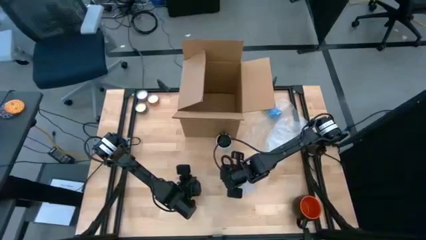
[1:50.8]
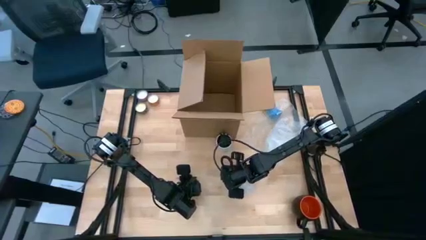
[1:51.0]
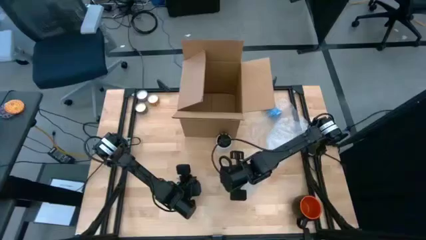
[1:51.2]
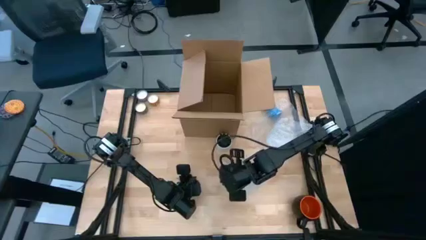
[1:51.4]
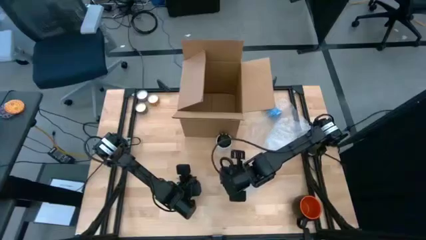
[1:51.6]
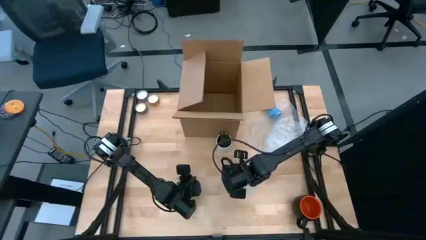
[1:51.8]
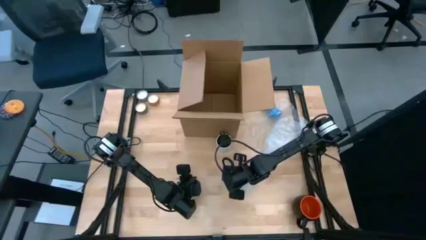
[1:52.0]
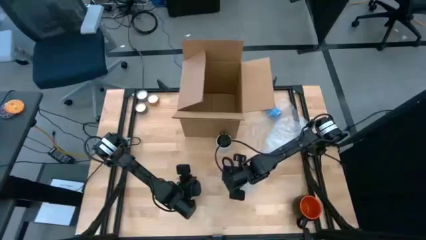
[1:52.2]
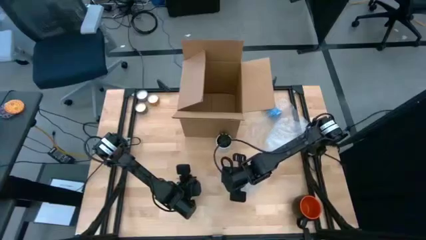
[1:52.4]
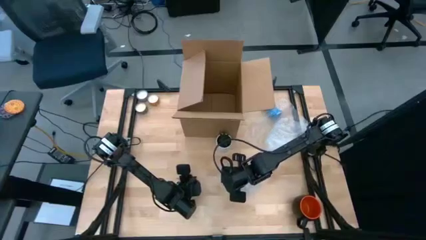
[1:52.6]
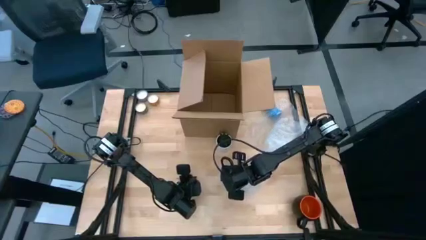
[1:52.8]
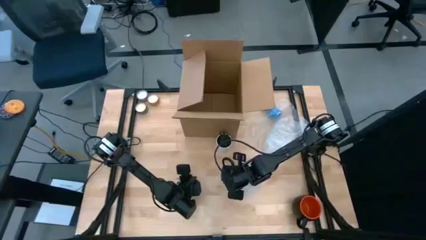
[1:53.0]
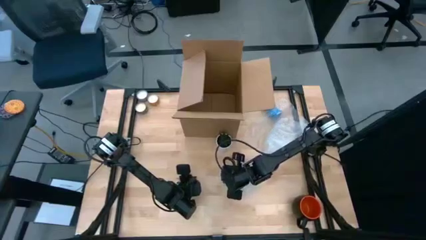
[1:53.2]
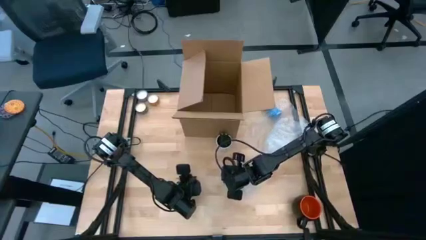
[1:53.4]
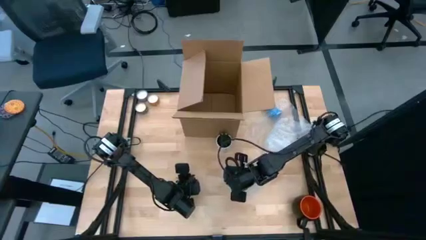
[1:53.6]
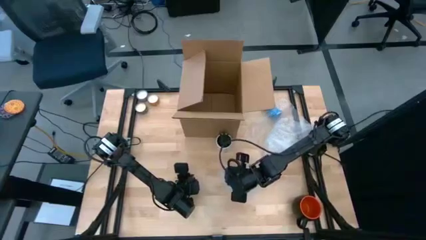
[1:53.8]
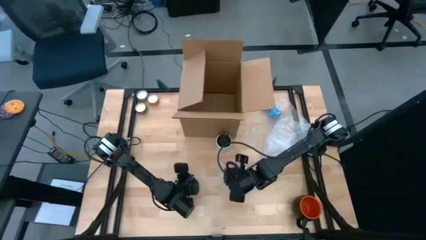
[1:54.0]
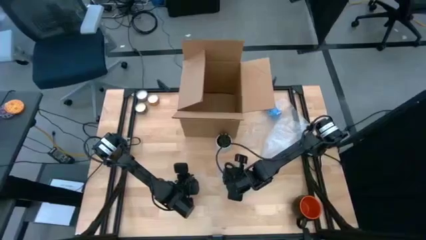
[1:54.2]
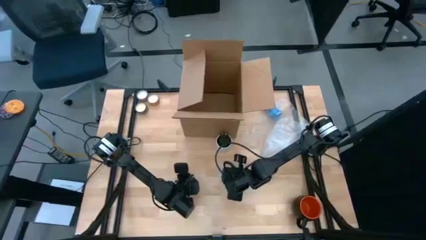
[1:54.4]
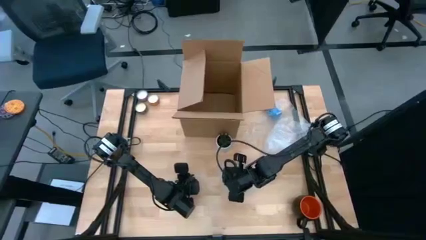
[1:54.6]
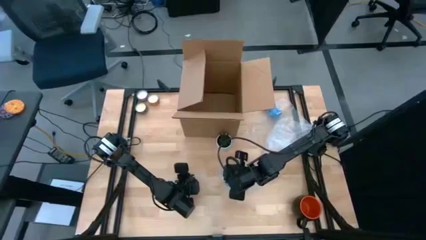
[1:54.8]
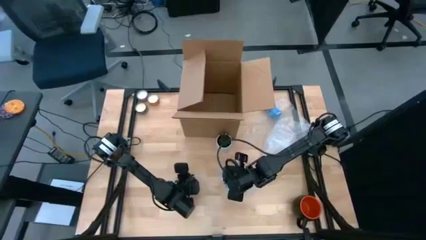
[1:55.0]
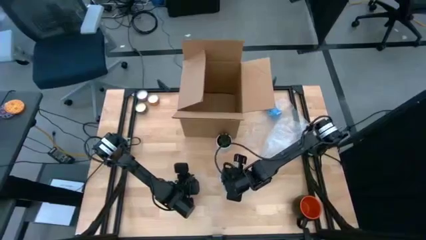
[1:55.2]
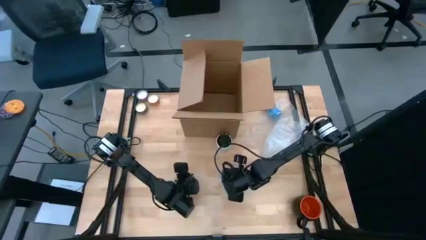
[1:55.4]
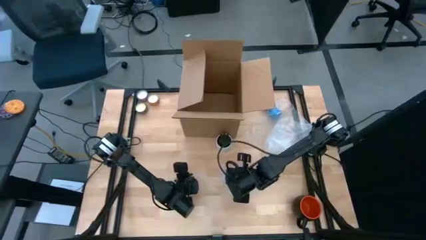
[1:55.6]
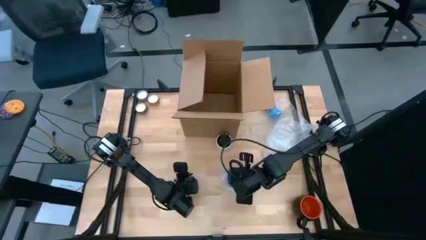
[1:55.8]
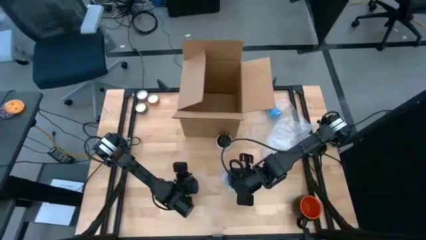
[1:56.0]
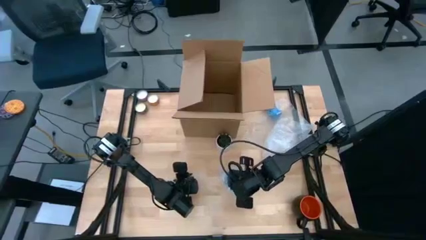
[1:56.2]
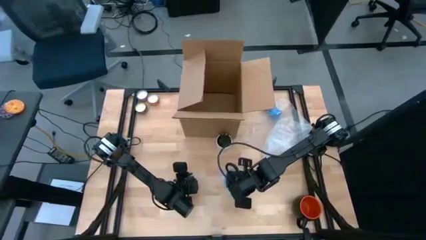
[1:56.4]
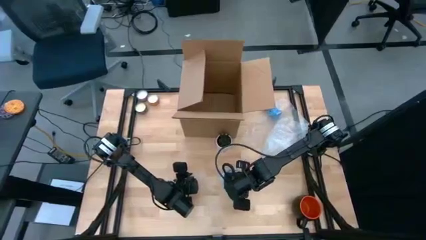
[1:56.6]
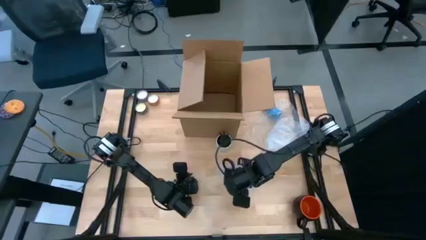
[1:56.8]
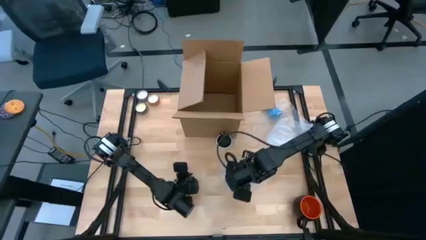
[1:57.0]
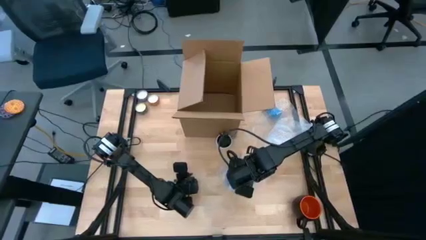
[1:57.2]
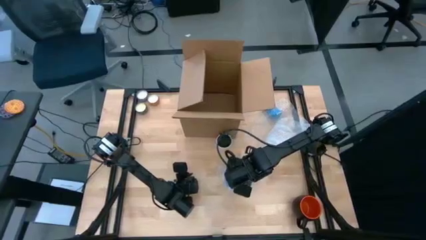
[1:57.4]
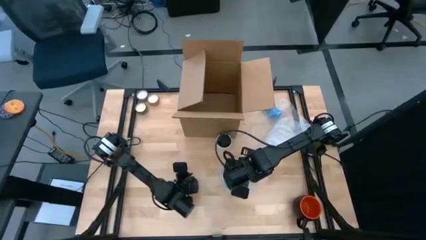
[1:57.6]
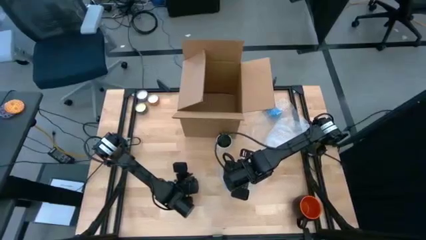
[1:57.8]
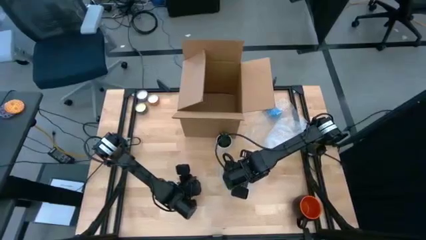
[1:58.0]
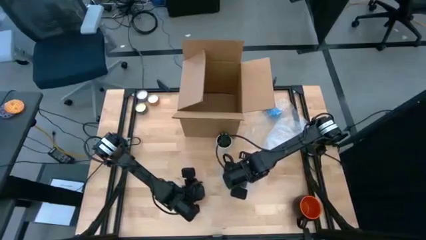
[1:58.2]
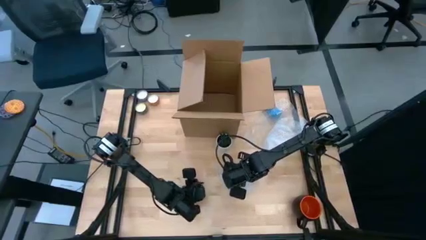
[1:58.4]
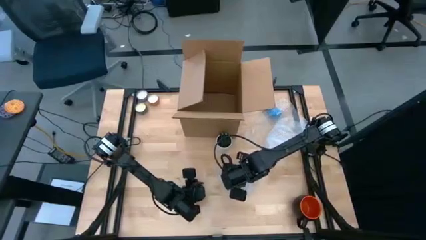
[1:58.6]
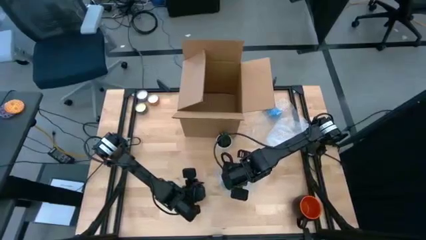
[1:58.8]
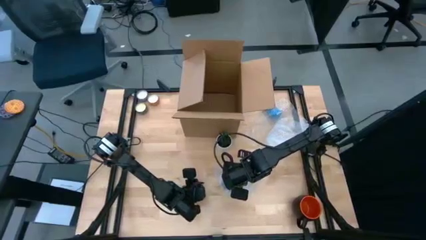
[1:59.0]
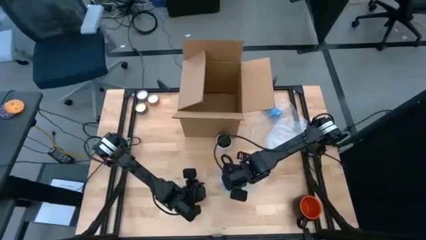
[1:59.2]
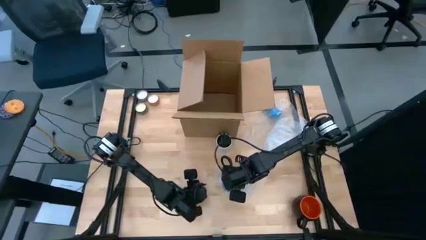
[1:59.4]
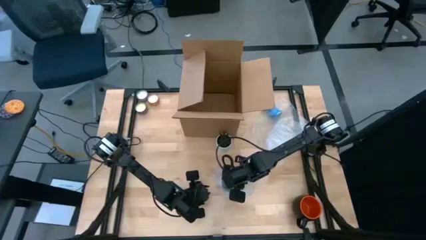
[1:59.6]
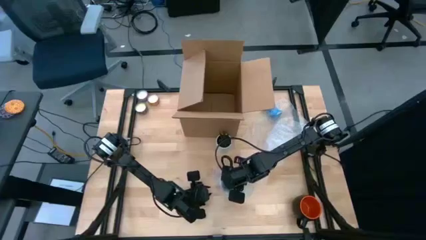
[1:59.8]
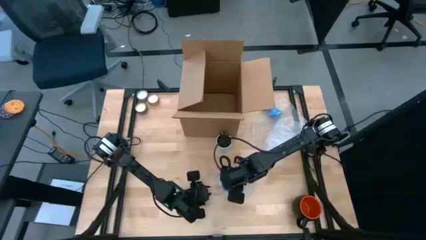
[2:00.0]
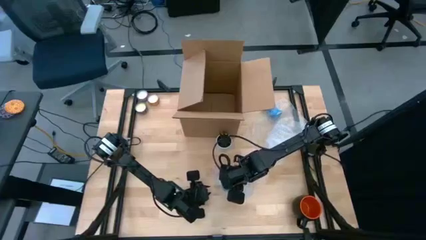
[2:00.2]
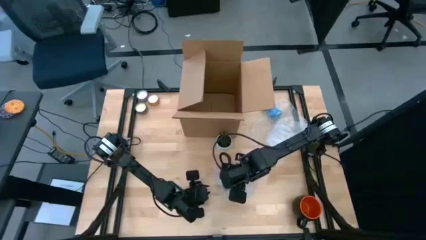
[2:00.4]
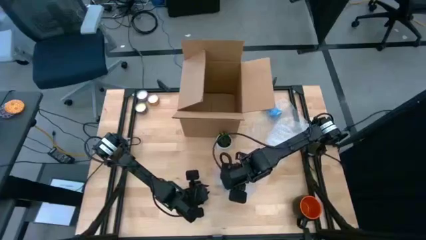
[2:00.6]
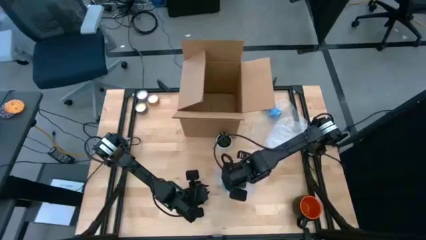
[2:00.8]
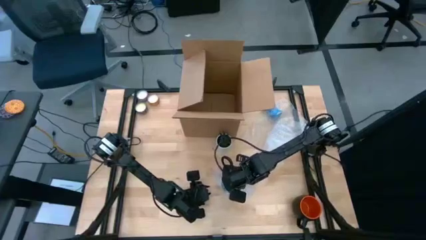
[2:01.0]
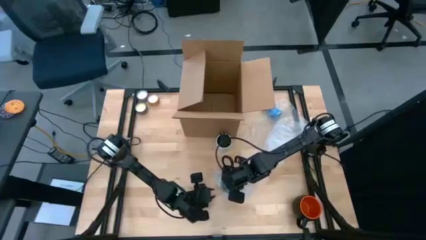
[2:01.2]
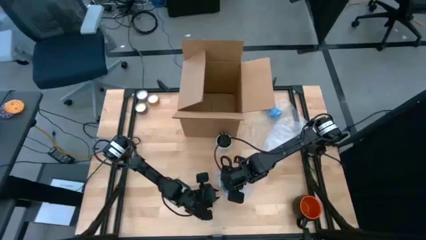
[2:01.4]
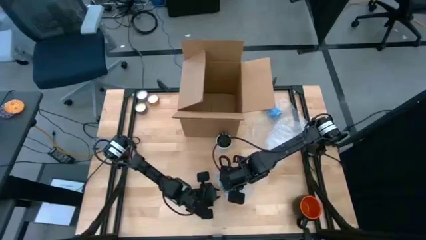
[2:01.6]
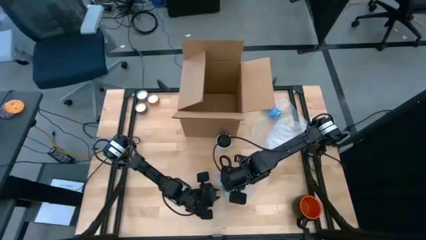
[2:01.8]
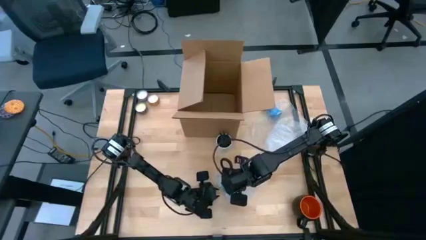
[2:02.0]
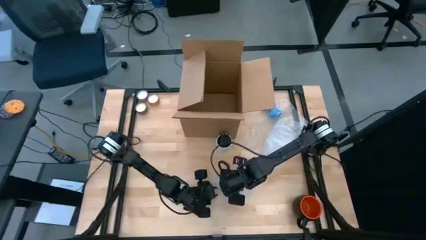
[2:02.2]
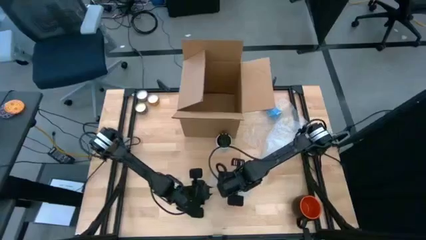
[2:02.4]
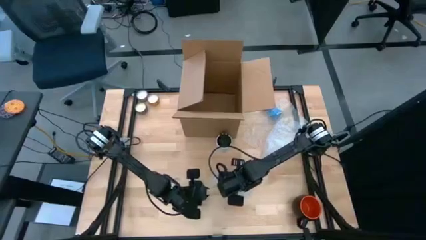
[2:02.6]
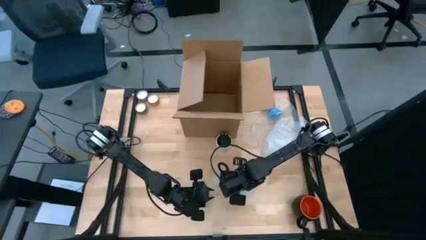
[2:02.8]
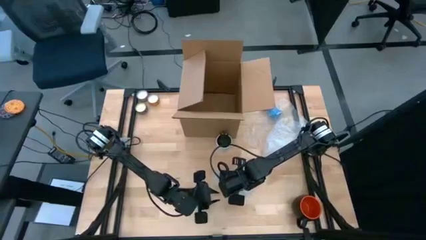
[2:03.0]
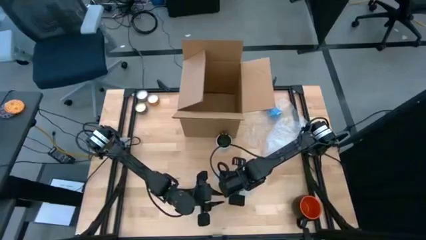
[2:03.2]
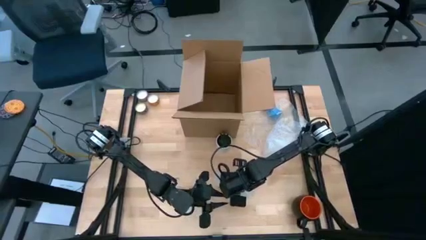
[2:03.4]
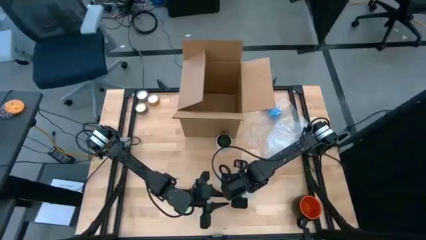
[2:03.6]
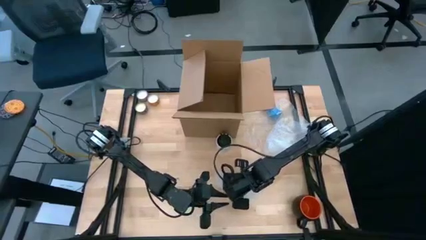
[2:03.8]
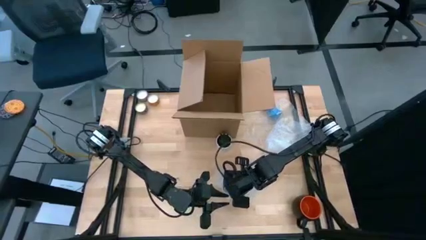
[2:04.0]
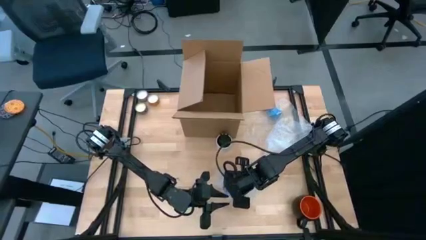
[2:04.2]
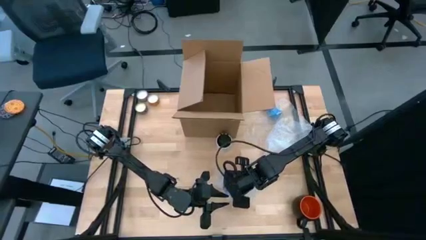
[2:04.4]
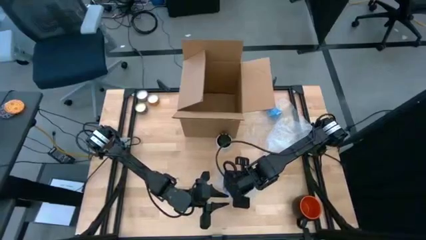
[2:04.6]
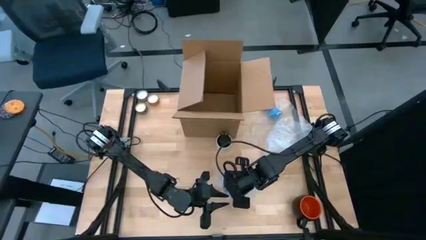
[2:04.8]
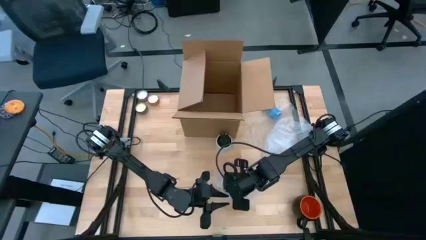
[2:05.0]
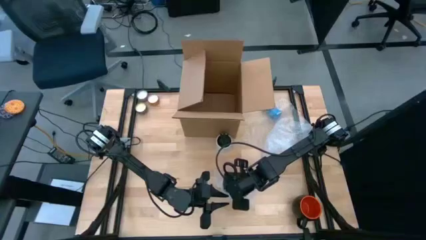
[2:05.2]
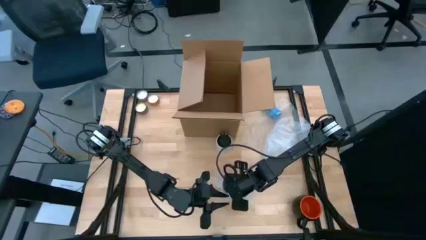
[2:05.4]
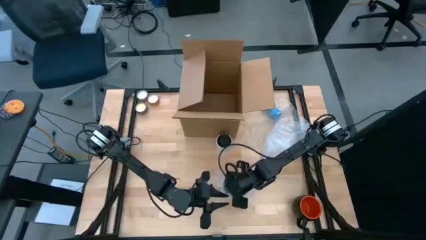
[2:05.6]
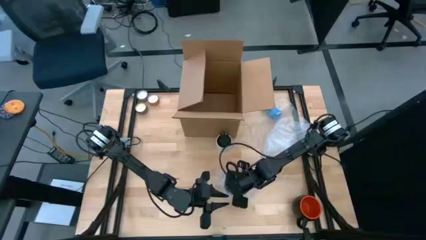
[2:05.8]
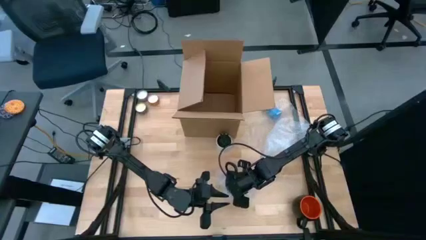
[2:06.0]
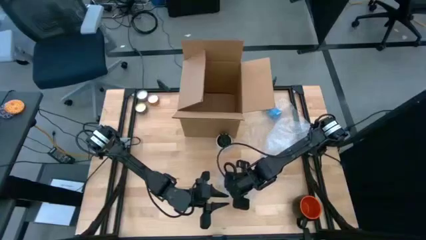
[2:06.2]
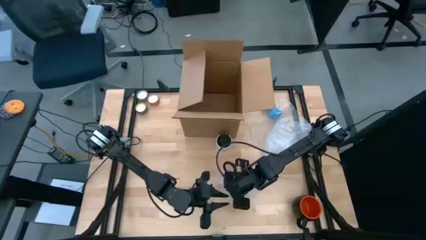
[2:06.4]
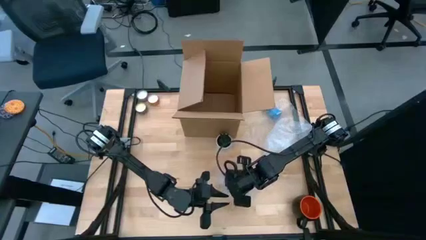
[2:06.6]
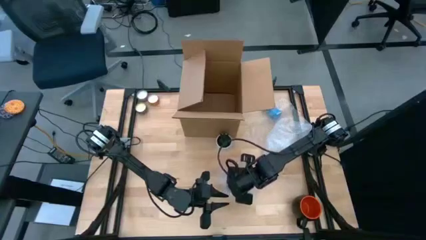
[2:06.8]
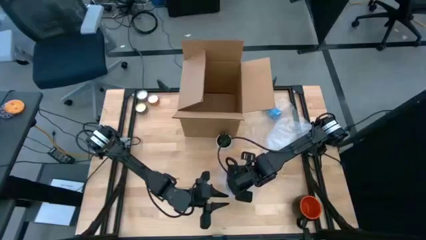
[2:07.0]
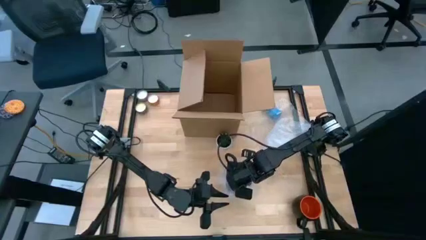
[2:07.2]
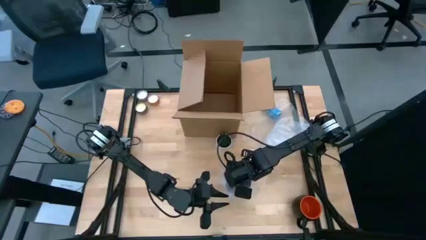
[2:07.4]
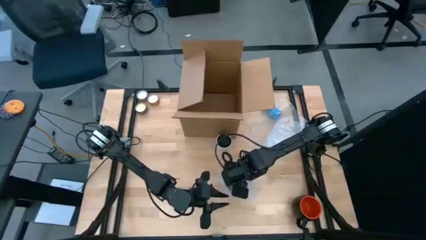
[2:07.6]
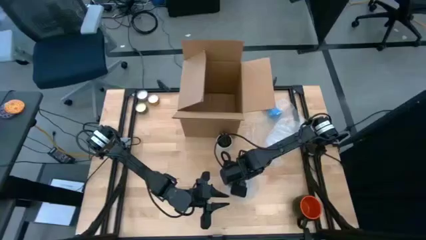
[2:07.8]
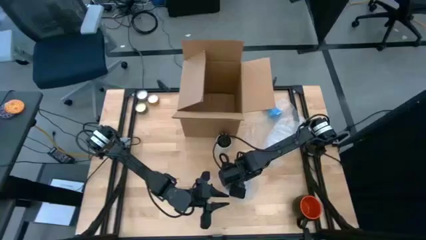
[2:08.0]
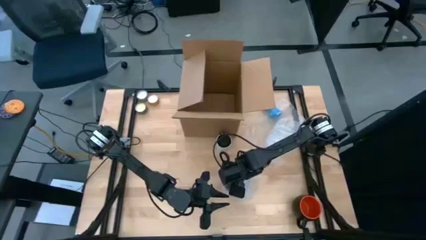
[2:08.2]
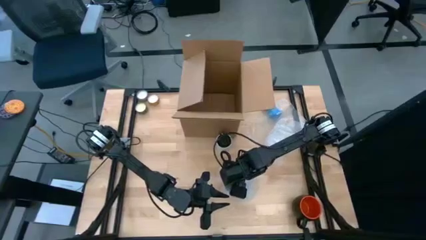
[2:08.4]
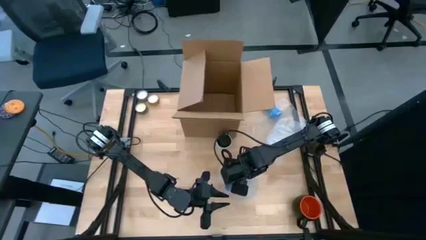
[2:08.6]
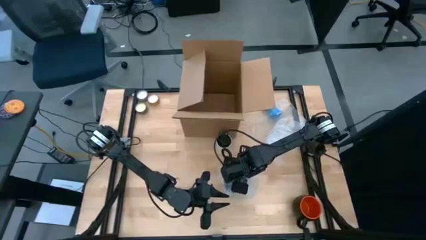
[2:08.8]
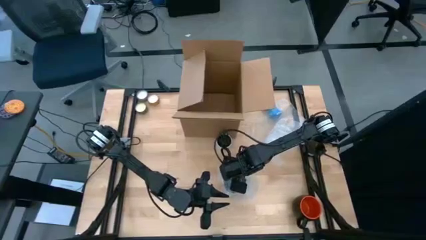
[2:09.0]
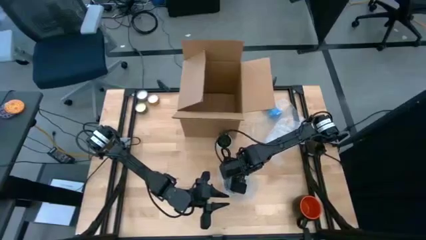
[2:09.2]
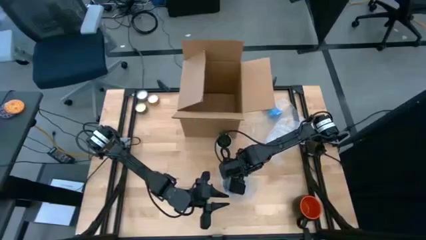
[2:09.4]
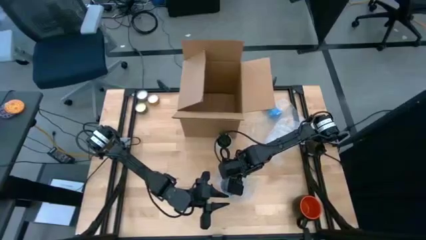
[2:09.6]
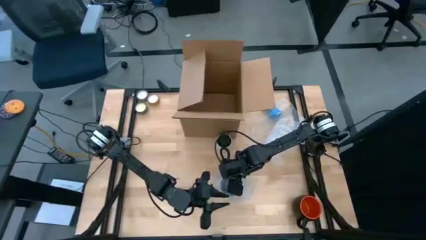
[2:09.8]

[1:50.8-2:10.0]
Task: wrap mug
Wrap the blue cup with the transparent bubble wrap
